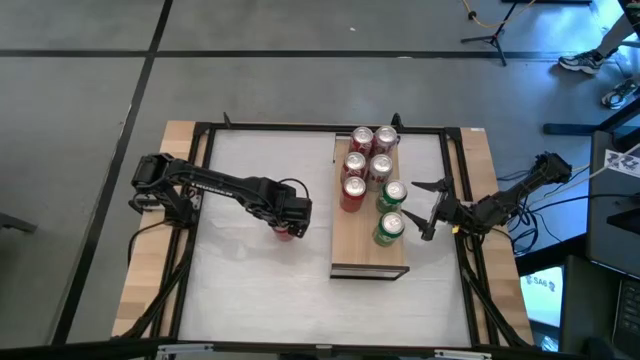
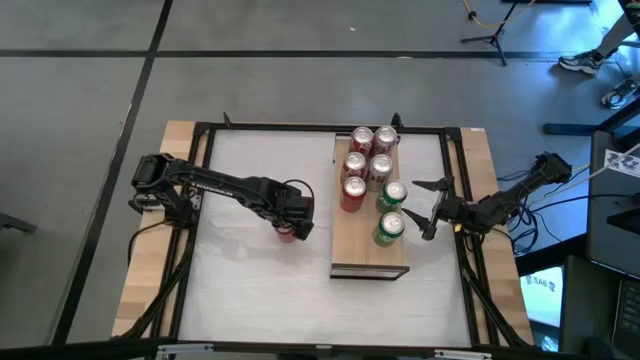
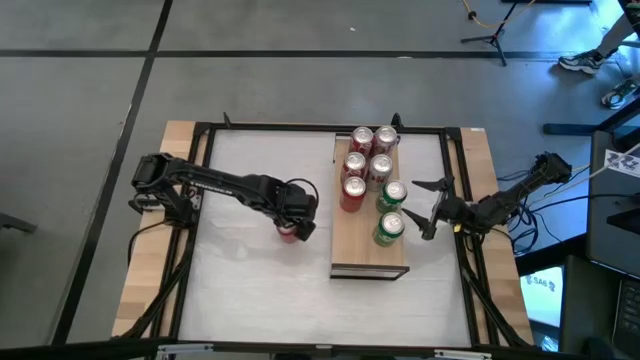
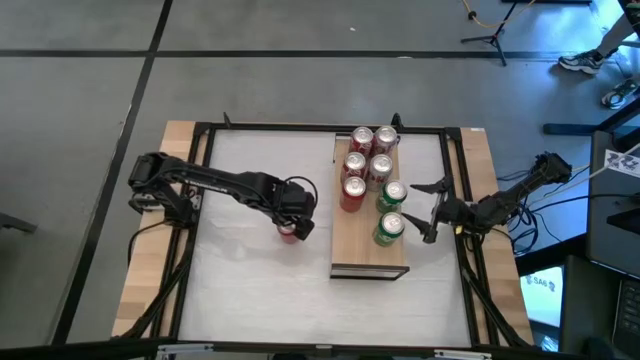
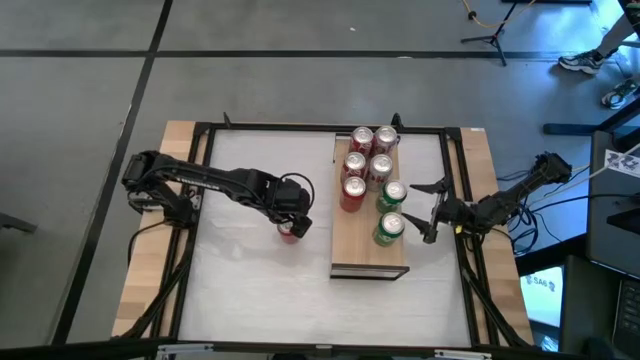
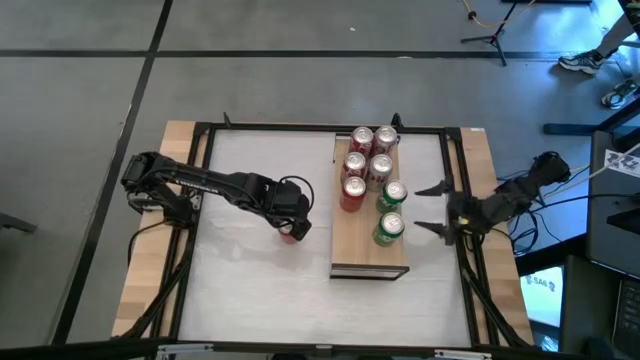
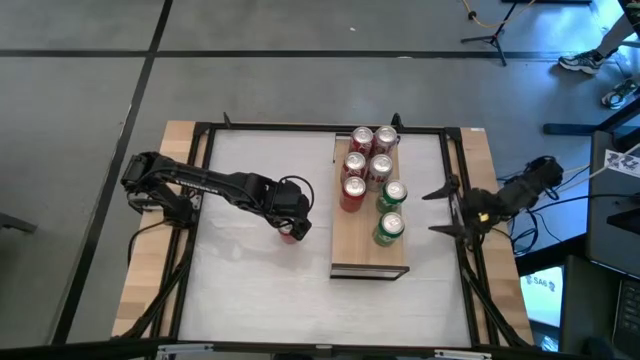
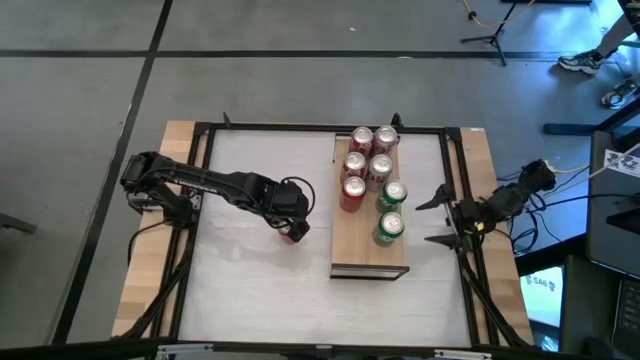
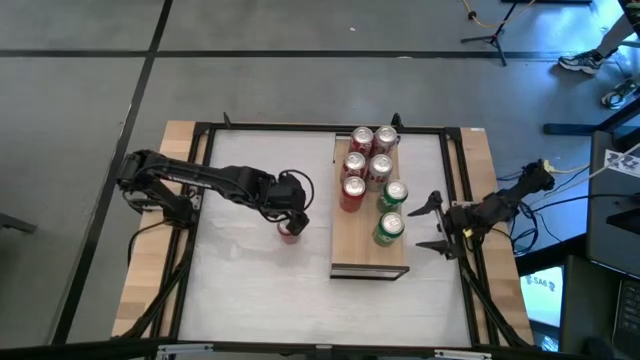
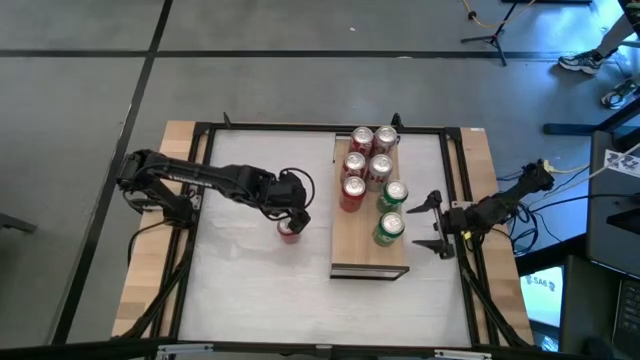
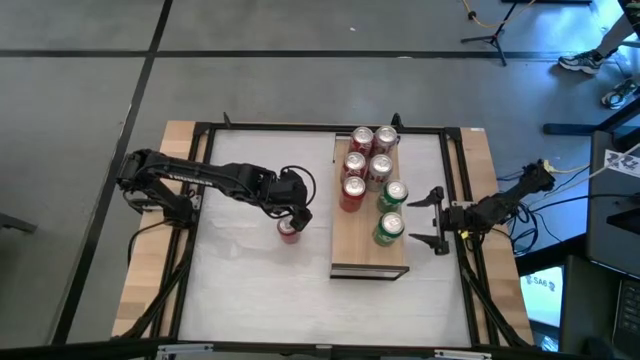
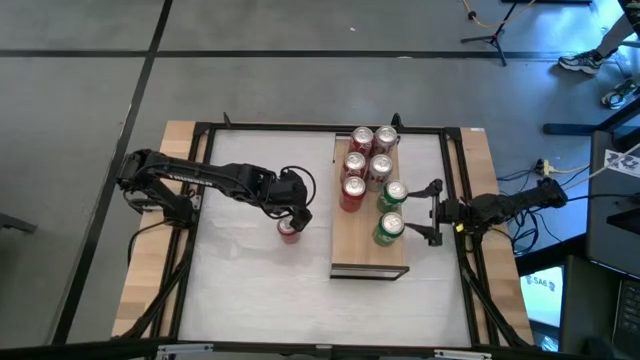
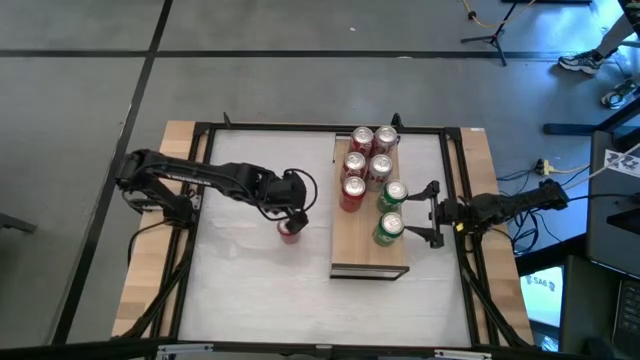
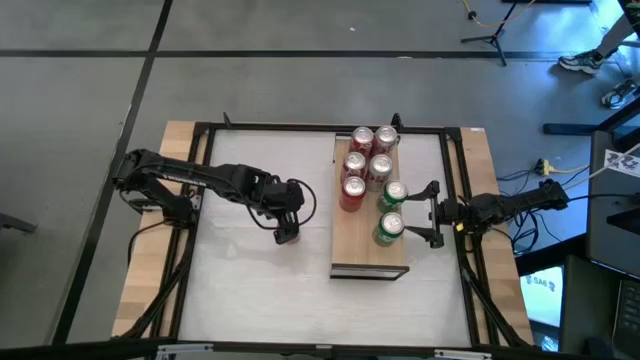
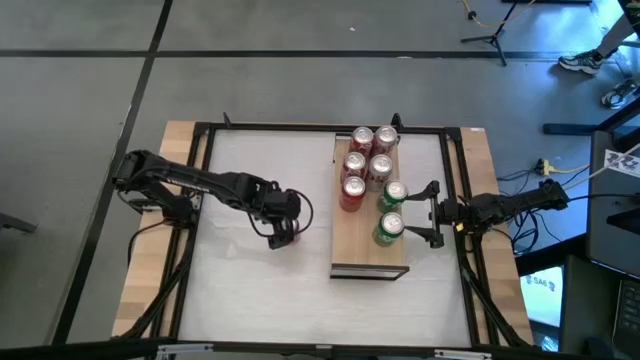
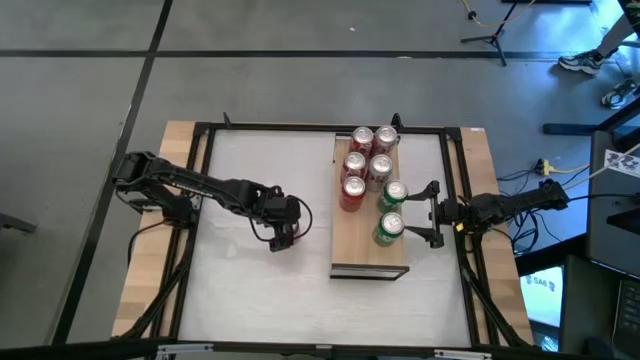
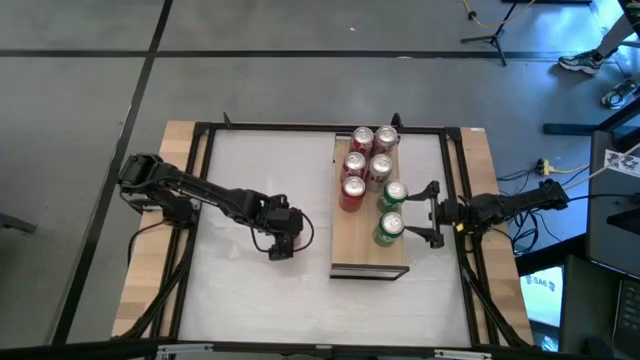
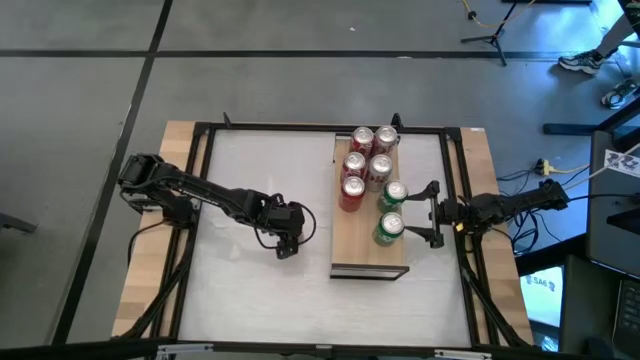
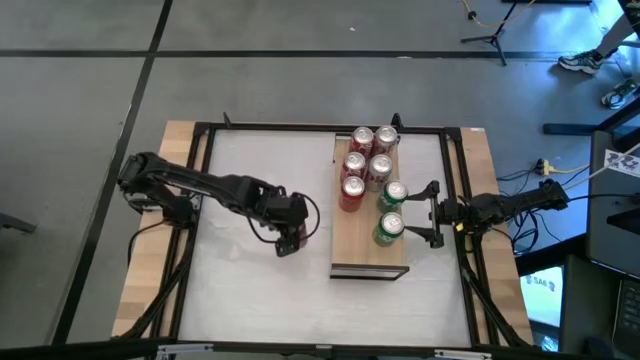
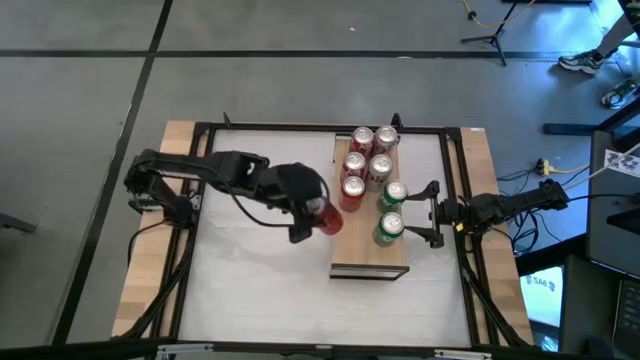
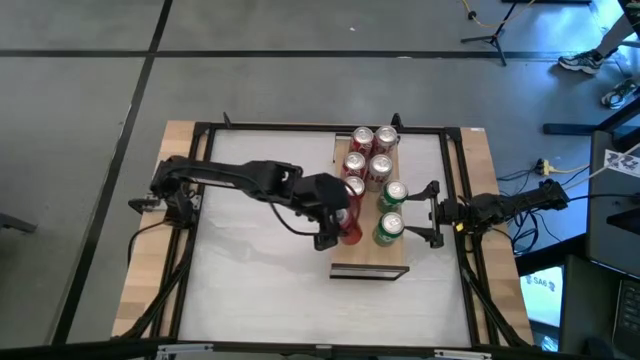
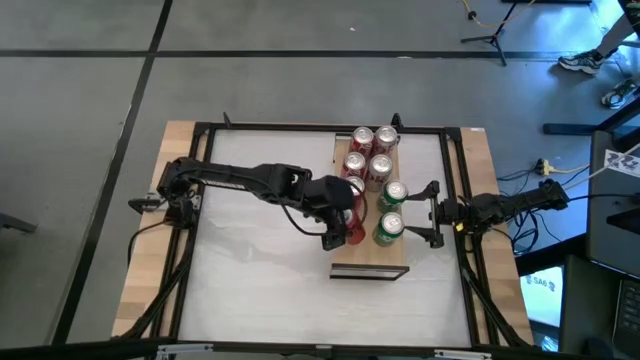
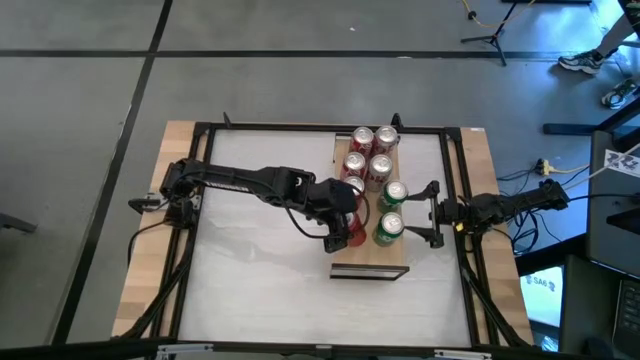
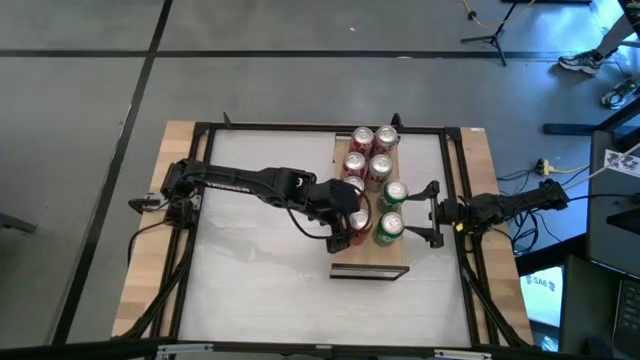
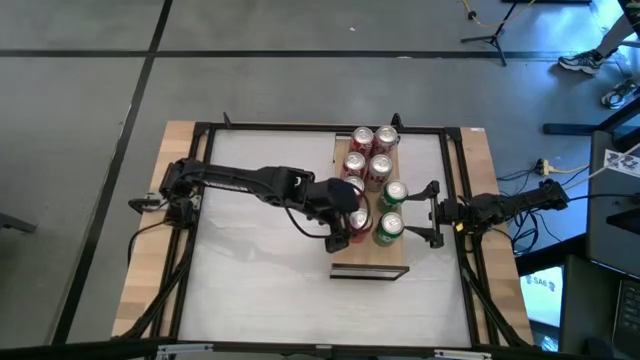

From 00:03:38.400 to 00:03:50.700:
Task: Place canned beverage on shelf
Put the red black soda can on the shelf aligned with the other red black soda can

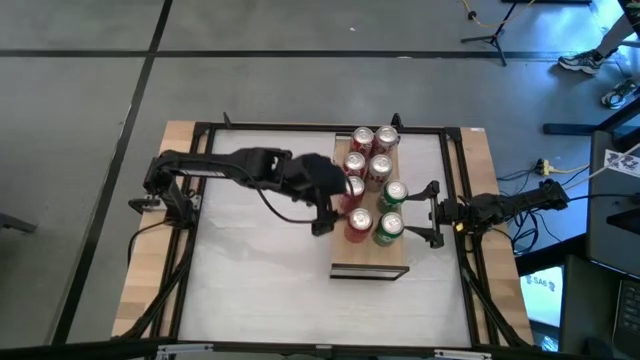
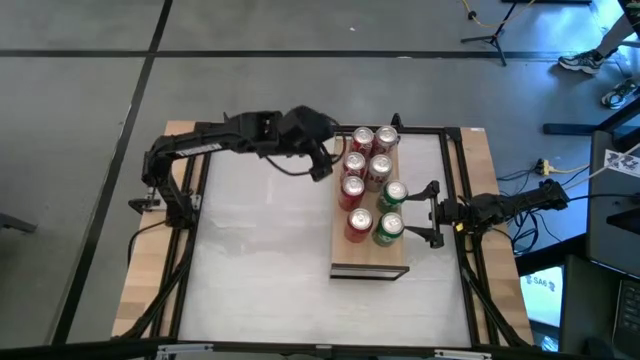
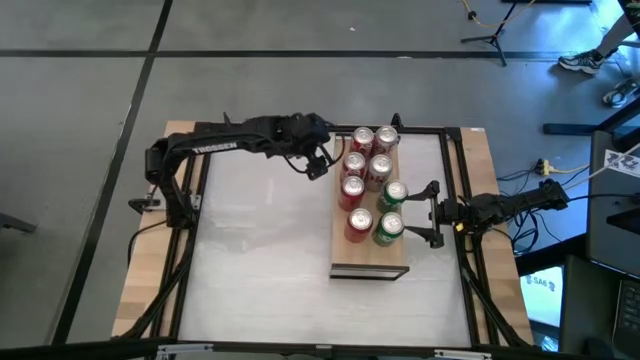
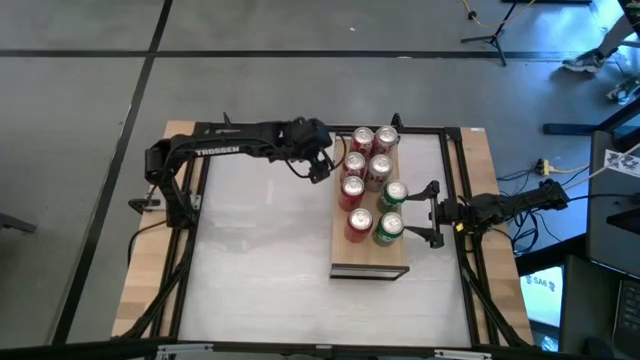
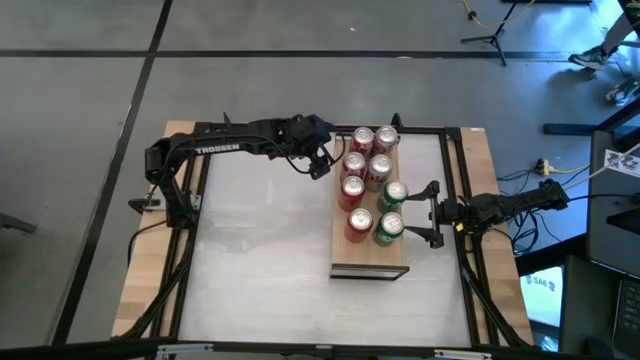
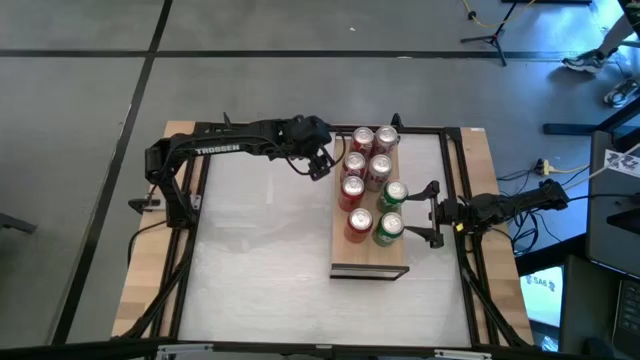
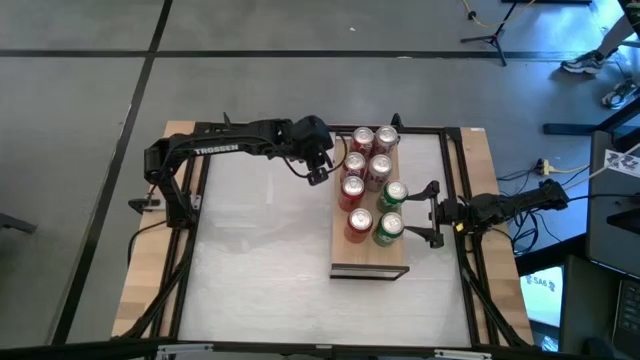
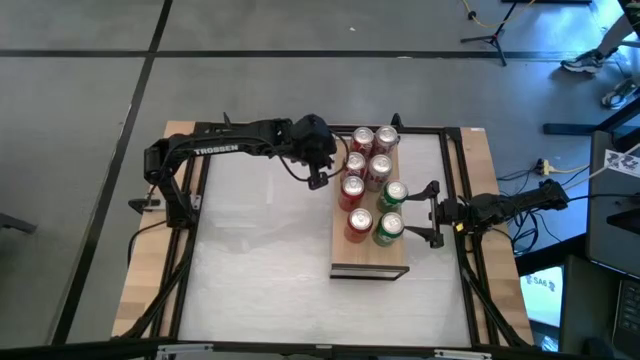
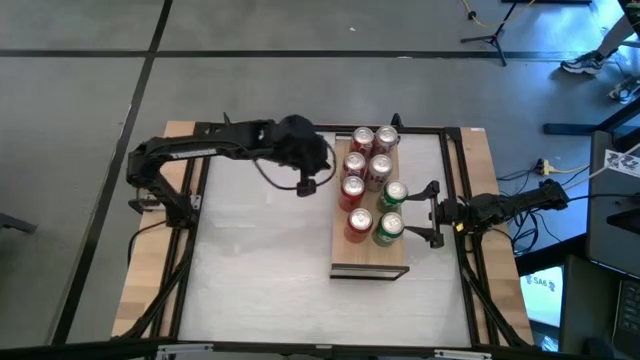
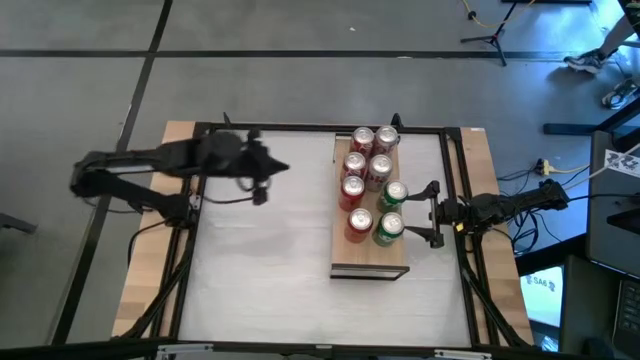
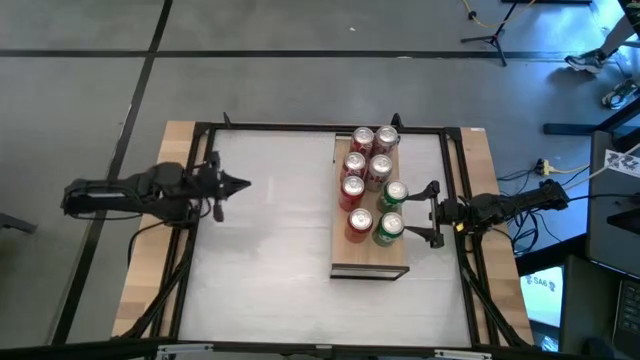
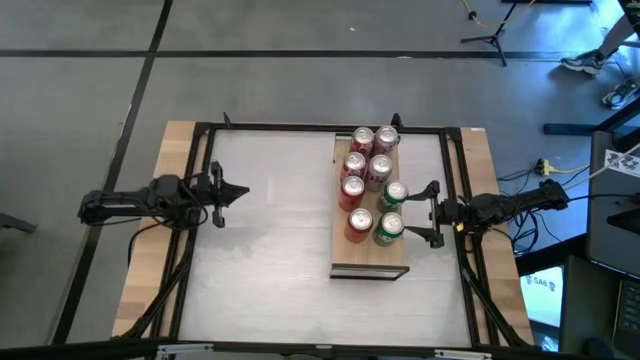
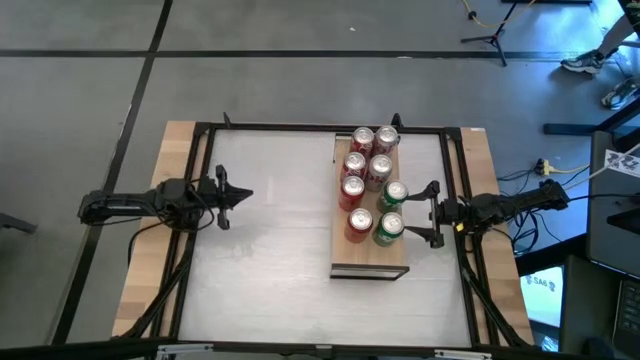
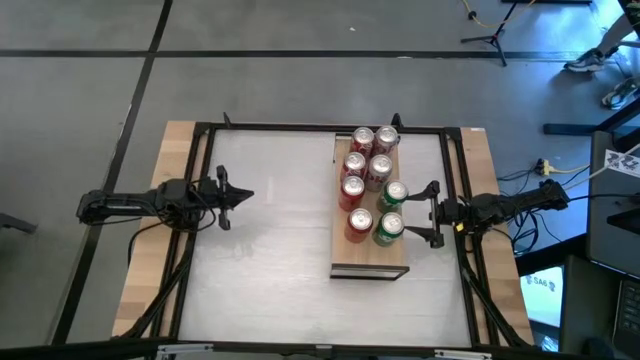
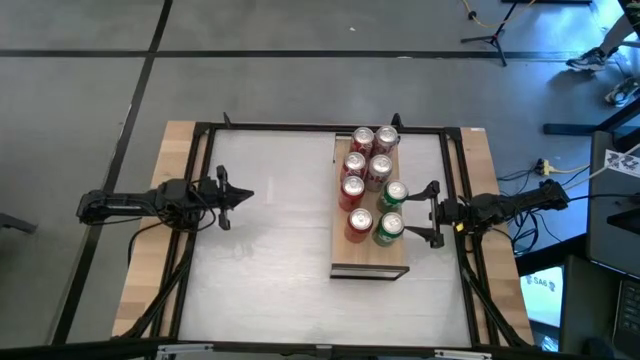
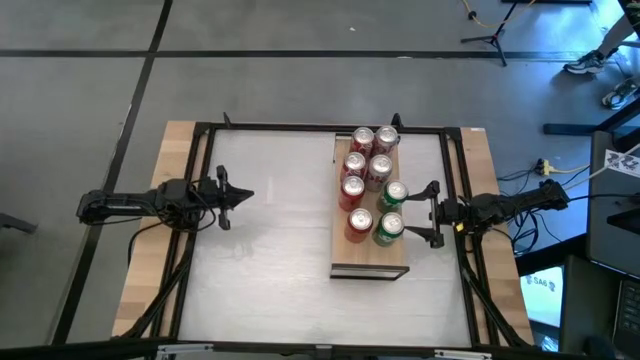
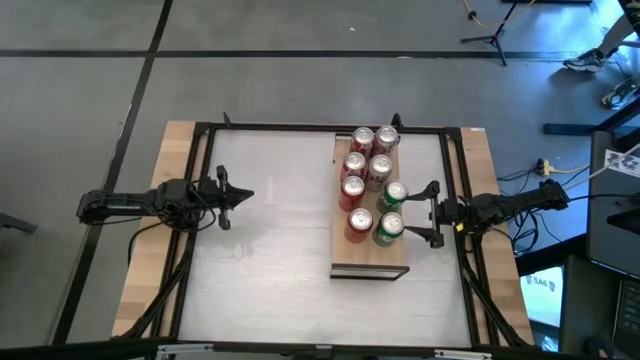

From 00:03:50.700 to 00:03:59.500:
Return to Home Position
